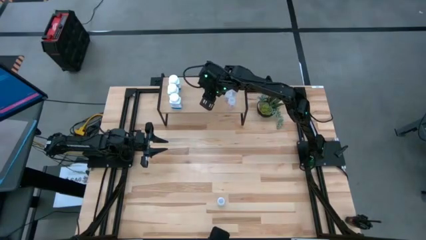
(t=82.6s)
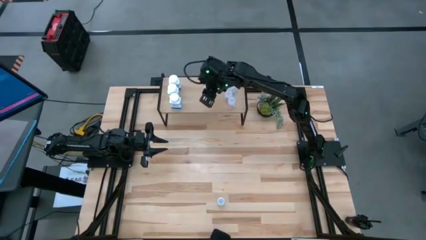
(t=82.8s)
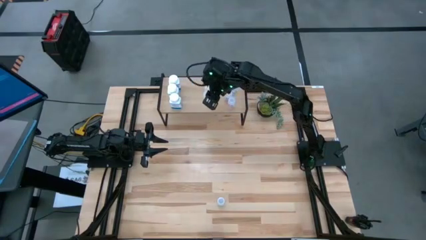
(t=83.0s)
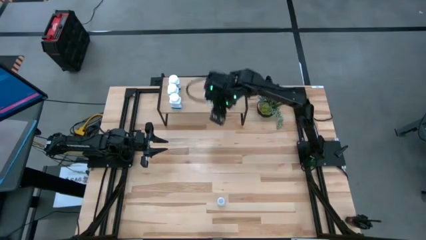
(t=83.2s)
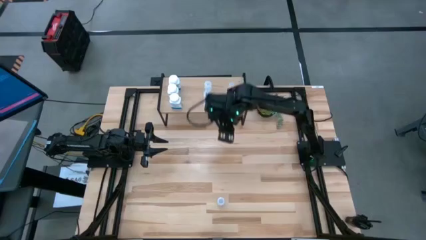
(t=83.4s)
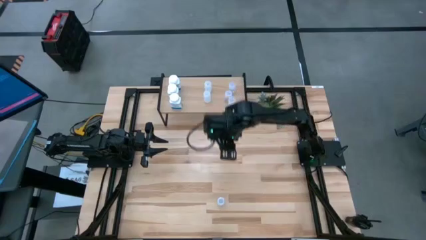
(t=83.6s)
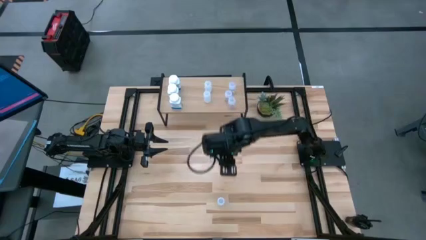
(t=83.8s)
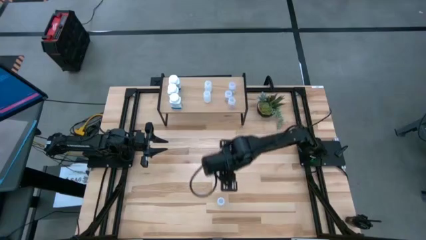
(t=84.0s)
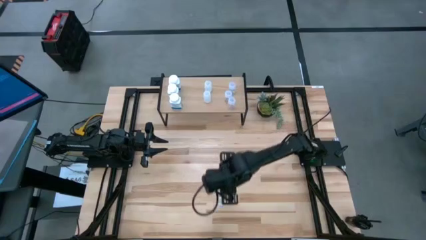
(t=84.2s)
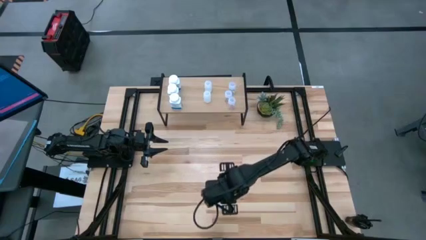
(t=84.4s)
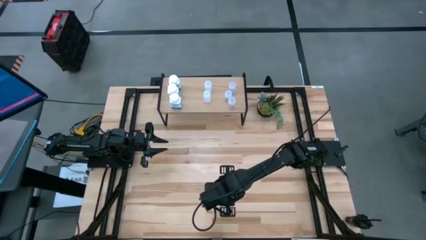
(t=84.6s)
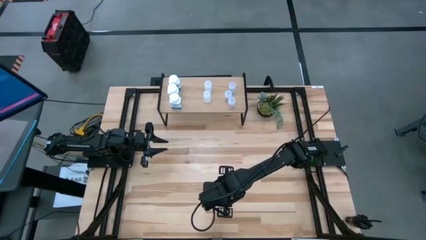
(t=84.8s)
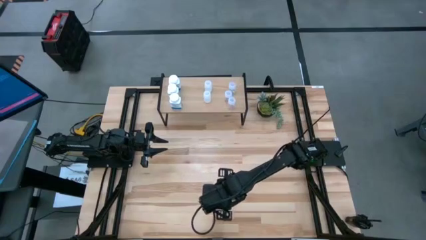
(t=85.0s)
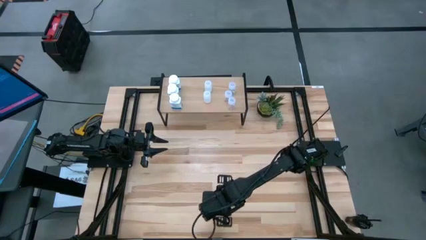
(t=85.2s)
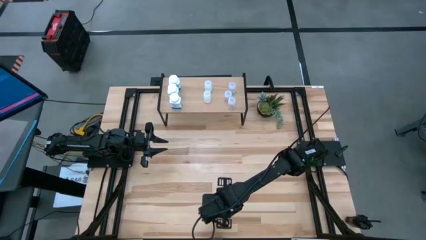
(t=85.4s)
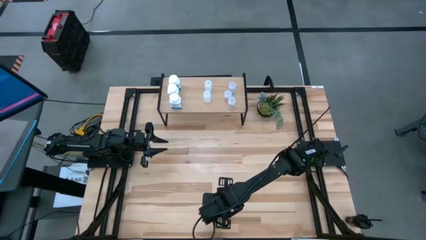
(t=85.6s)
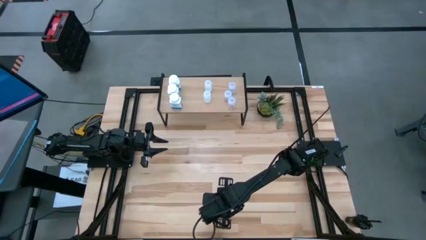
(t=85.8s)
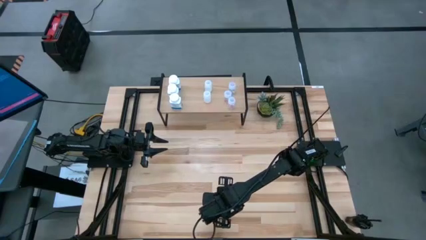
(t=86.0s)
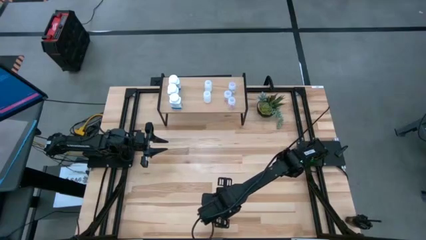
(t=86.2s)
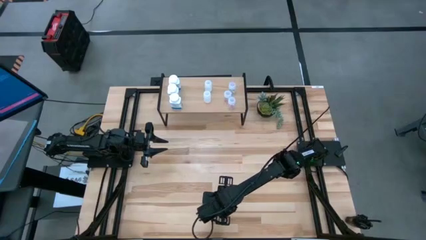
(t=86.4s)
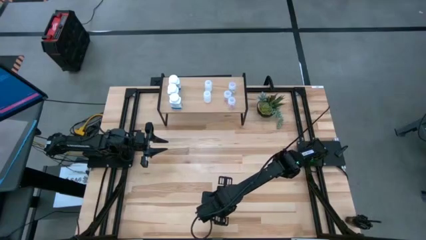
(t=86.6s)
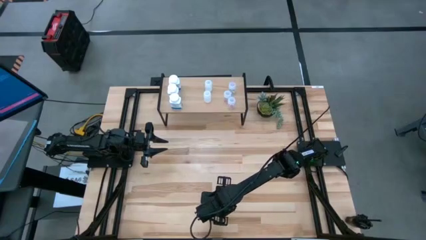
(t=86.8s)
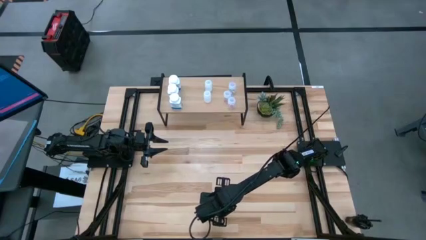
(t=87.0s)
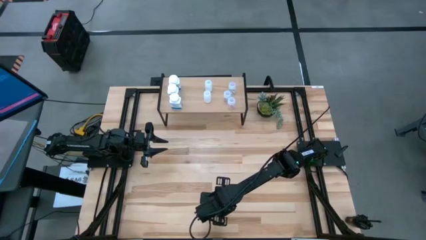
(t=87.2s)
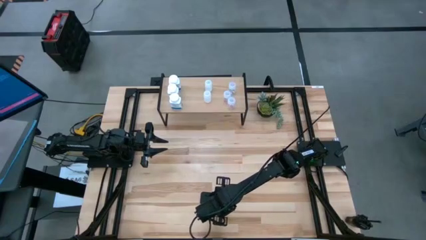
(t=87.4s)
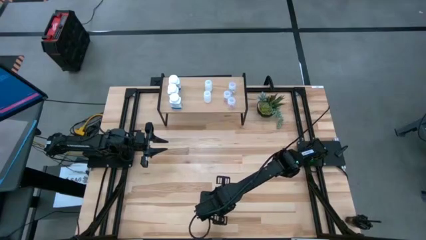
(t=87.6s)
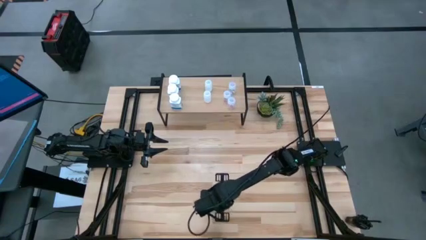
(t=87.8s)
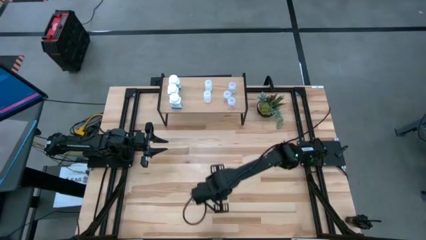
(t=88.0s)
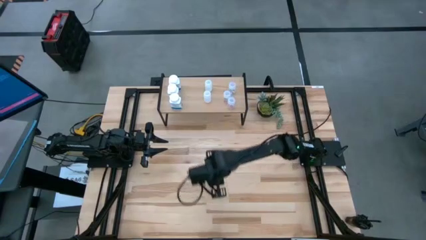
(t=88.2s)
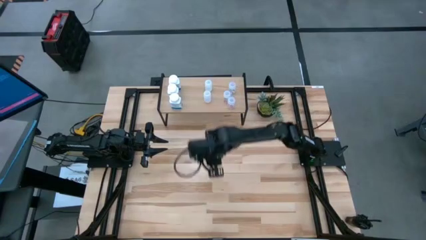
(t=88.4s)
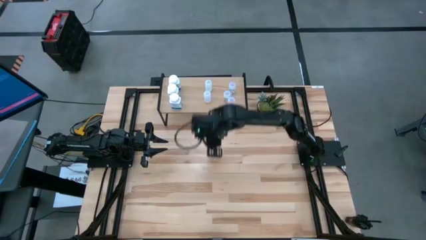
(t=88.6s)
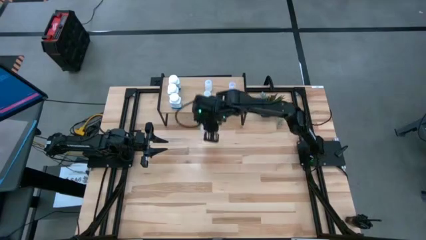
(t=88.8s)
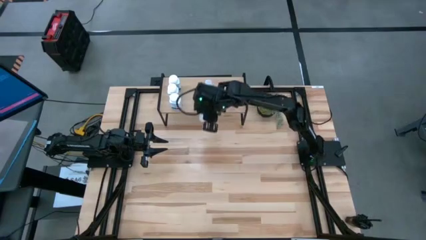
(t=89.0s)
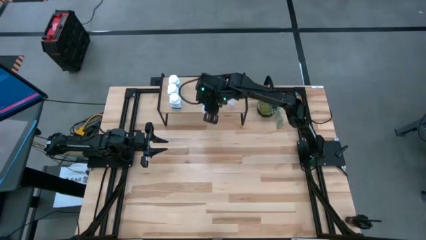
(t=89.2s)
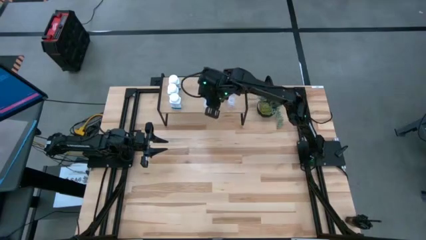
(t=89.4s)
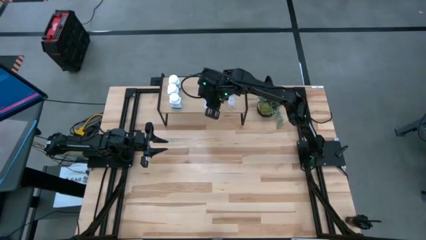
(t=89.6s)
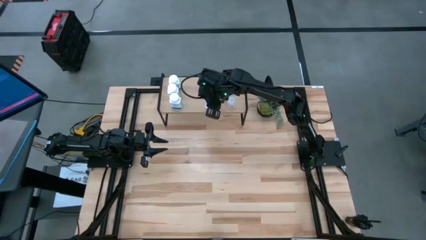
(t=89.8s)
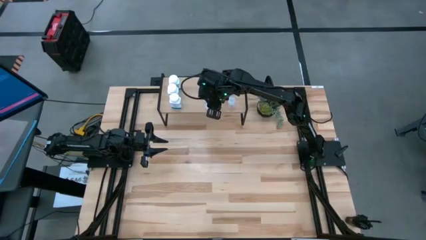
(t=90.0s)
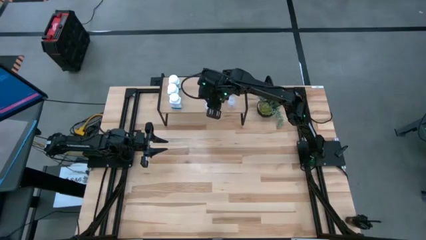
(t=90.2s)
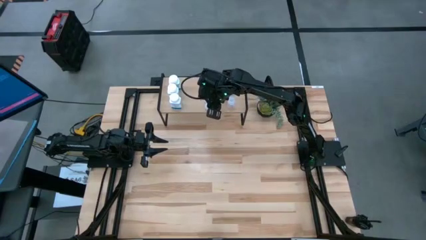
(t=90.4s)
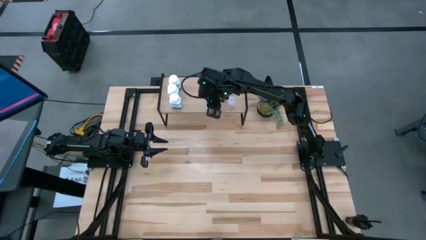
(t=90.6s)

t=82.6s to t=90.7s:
Task: Pick and place medicine bottles onto shelf by color
Put the transparent pill bottle on the shelf aligned with the other transparent pill bottles

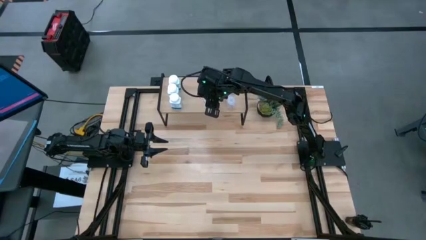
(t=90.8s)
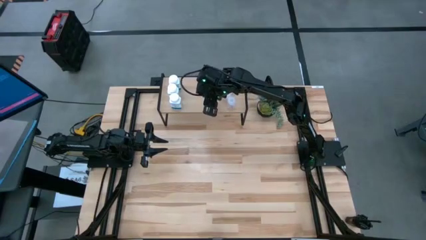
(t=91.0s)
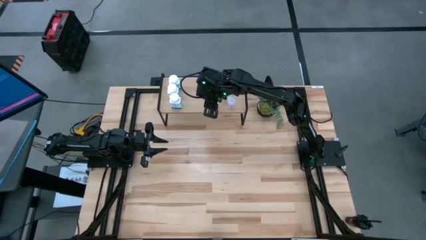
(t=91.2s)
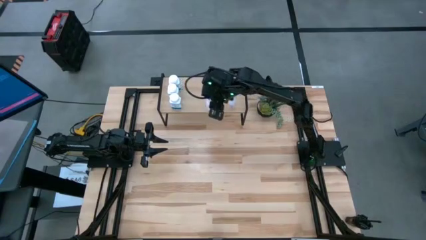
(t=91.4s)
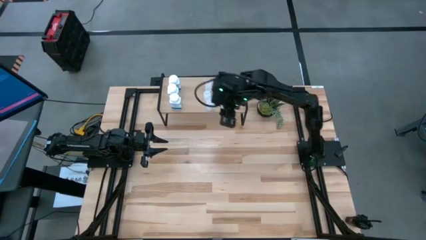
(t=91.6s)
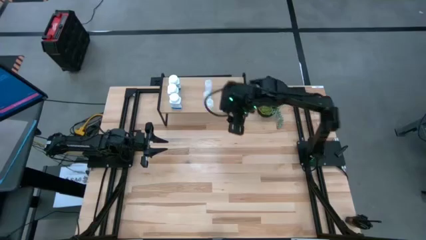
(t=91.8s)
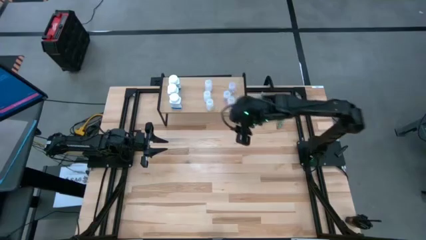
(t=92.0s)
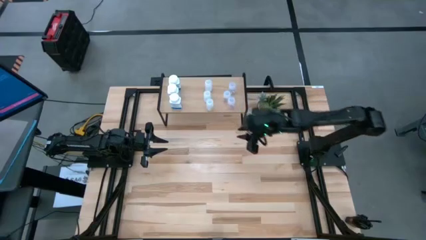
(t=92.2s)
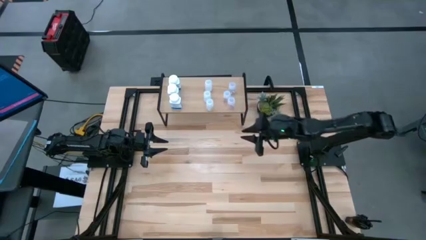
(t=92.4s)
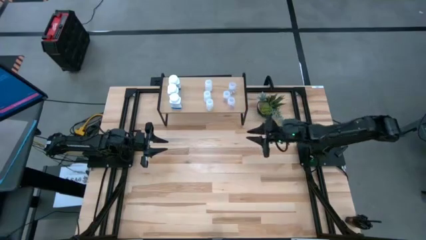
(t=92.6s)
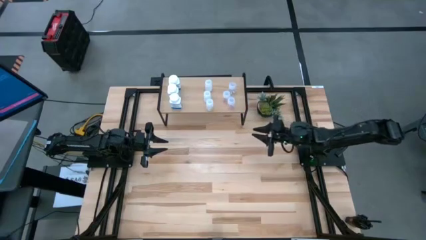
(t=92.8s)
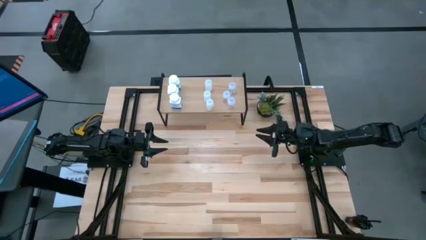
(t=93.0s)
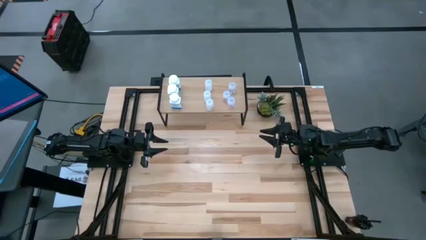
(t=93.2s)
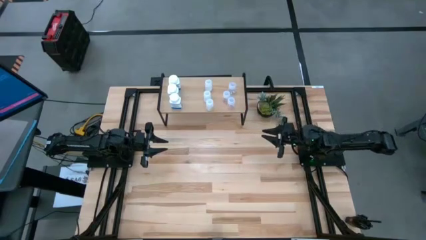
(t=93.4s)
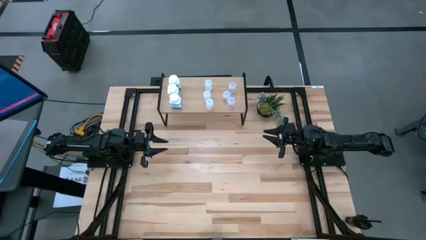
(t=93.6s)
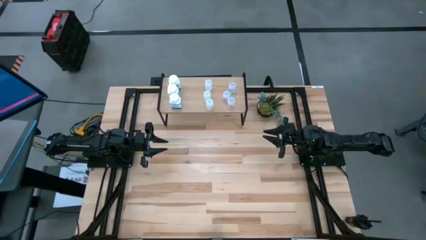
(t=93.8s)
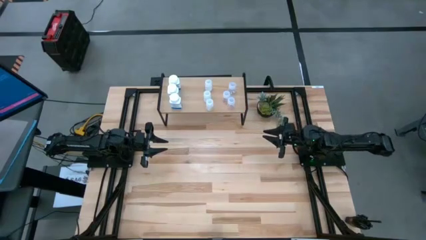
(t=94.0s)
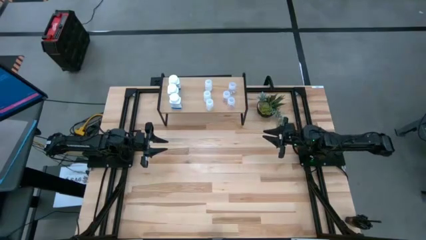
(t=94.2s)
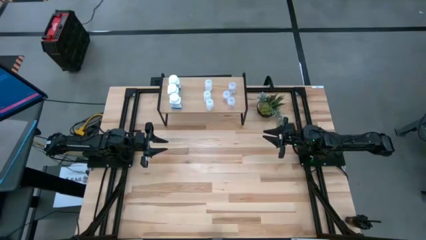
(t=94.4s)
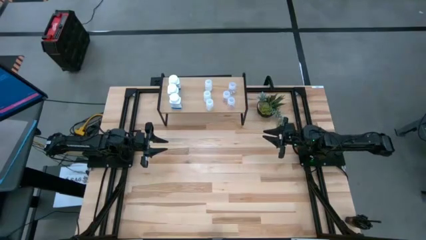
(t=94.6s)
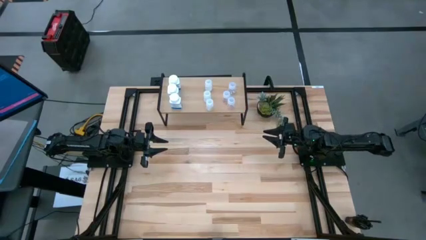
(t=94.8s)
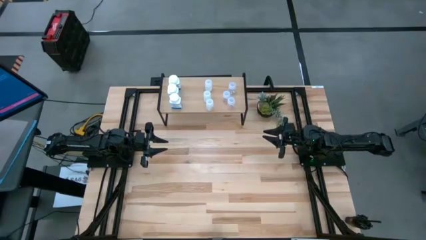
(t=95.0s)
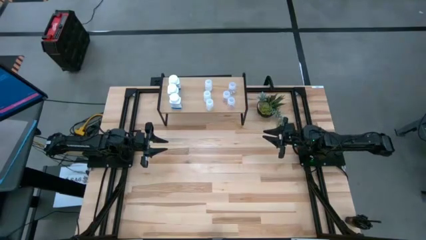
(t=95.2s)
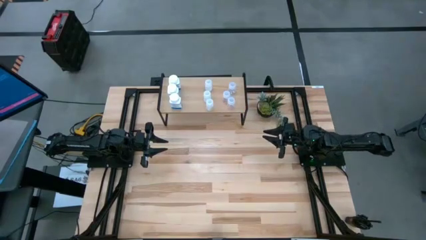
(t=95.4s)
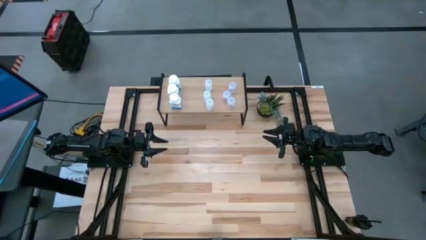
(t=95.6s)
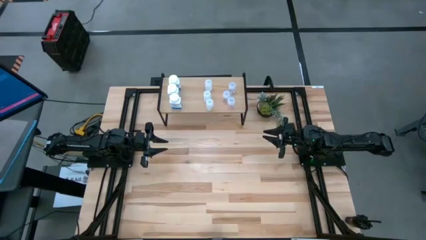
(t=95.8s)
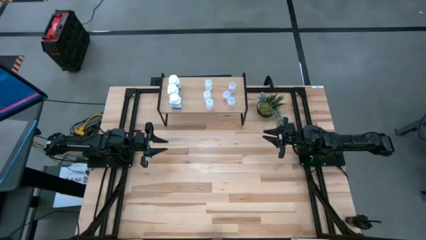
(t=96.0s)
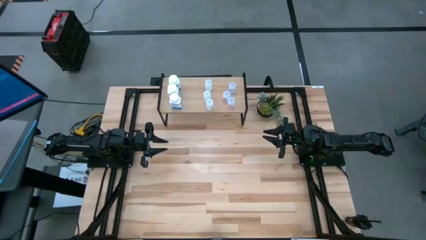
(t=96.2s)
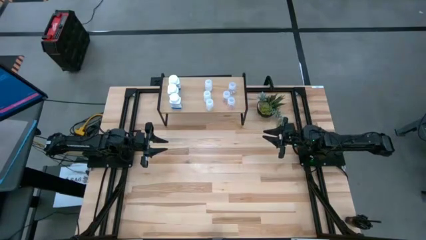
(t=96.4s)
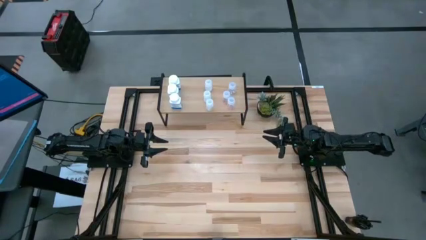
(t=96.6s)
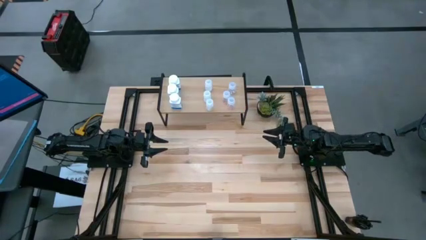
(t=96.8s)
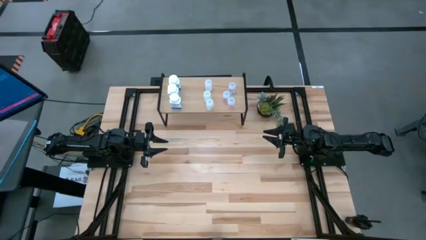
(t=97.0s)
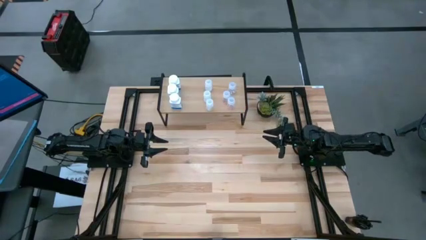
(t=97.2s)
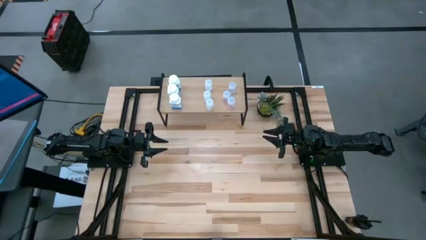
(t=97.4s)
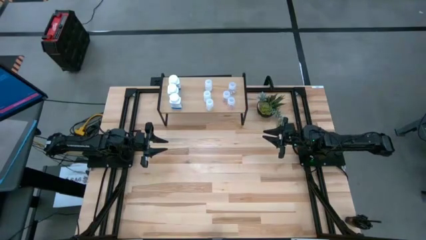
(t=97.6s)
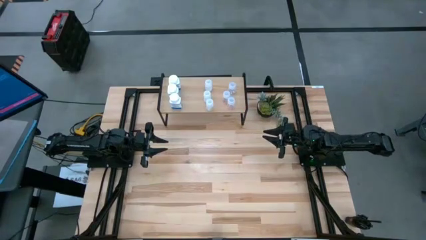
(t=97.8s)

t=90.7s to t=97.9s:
Return to Home Position

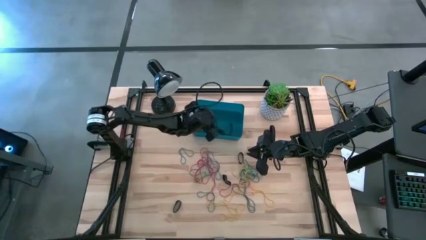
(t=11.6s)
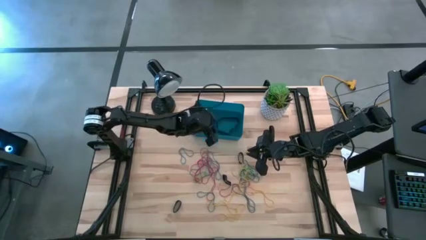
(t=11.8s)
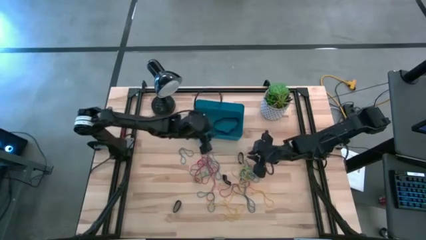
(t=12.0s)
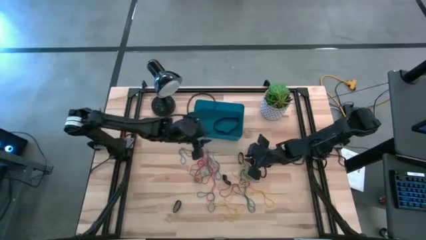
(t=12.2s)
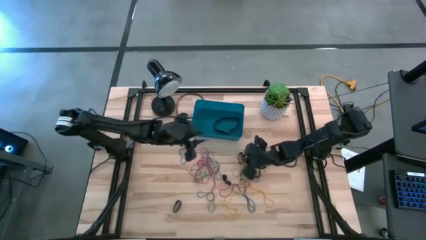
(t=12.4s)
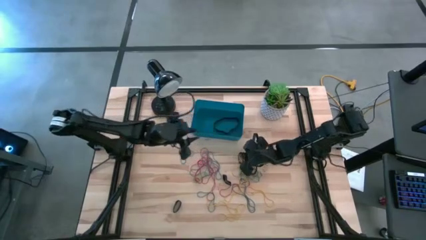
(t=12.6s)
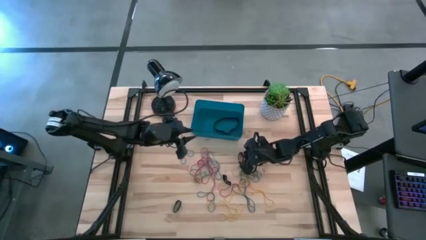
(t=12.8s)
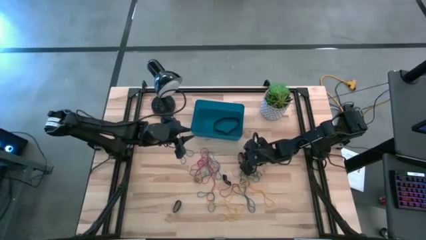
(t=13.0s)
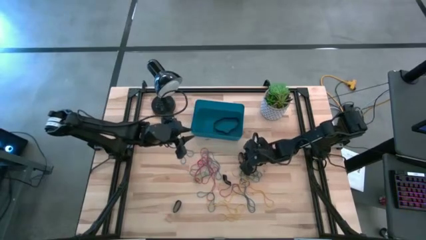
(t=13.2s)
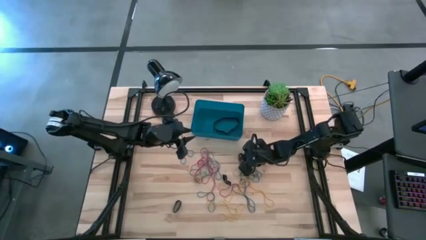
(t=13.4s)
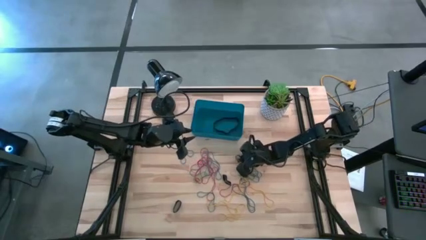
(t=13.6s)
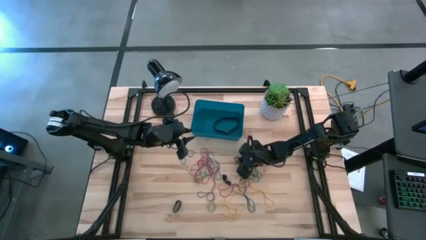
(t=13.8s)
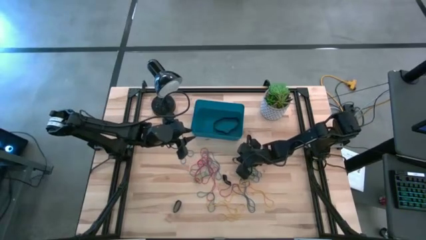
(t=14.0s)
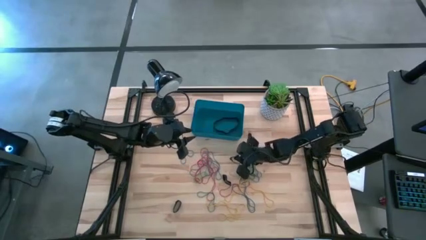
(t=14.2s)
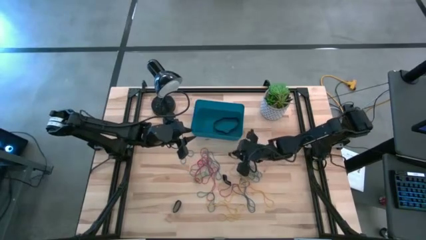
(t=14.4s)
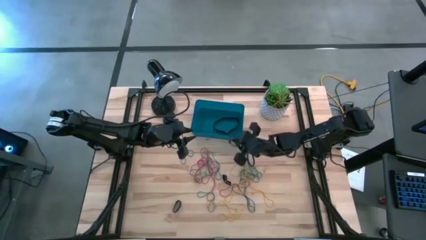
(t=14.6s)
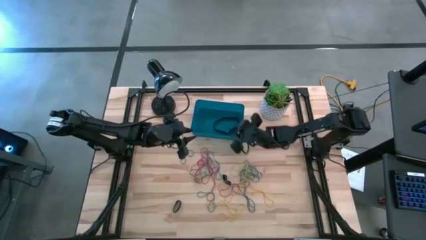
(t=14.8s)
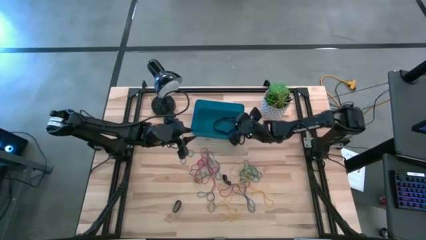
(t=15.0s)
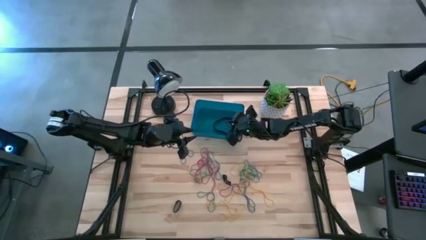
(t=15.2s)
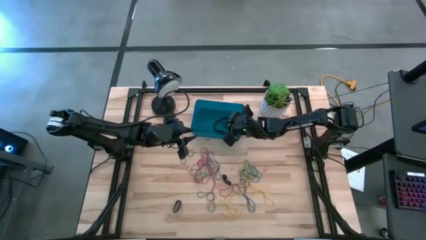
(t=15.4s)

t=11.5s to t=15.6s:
Task: Pick and place rubber bands into bin
Put the top black rubber band into the blue bin
